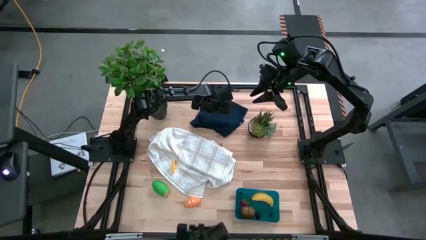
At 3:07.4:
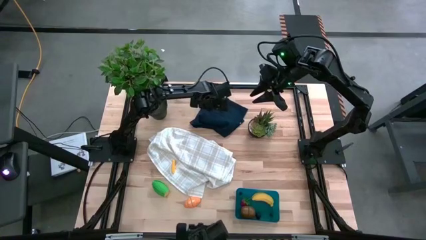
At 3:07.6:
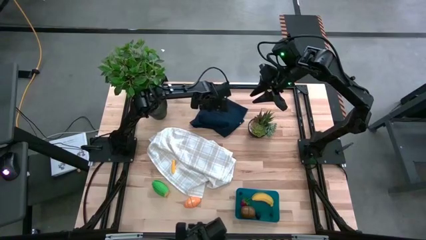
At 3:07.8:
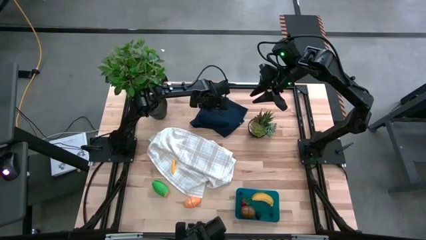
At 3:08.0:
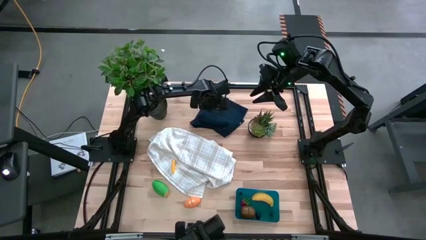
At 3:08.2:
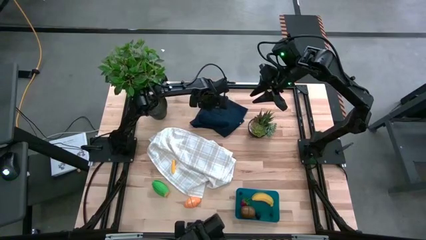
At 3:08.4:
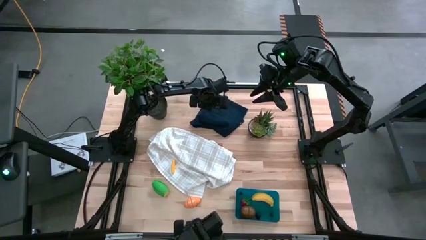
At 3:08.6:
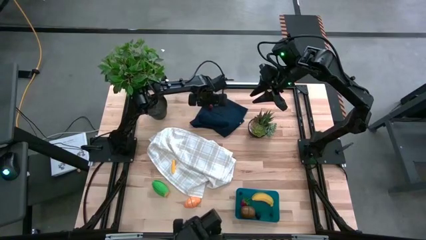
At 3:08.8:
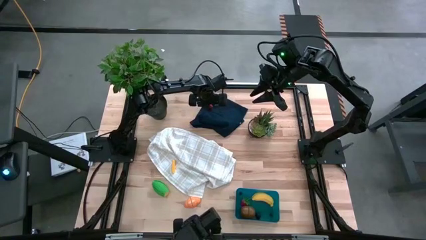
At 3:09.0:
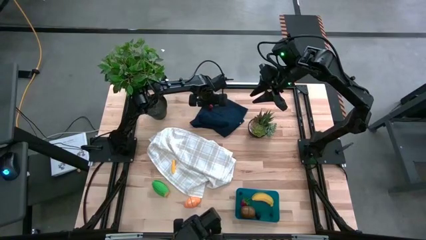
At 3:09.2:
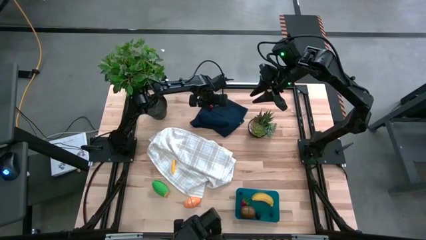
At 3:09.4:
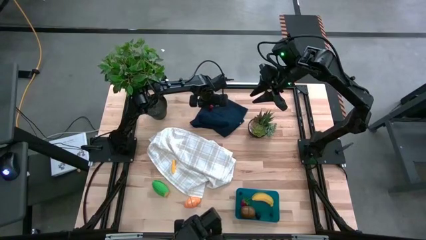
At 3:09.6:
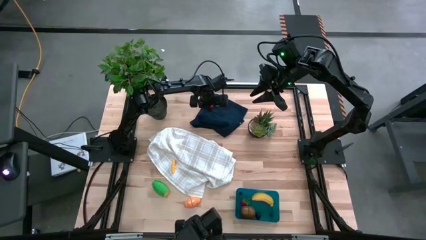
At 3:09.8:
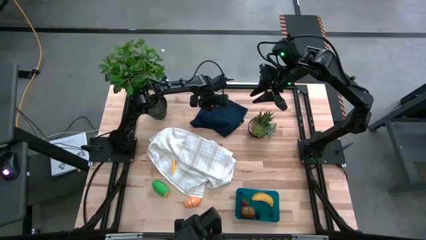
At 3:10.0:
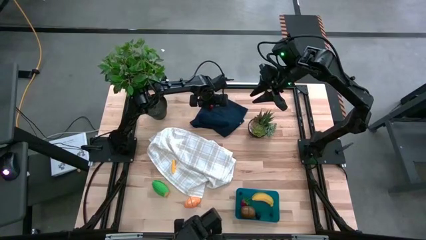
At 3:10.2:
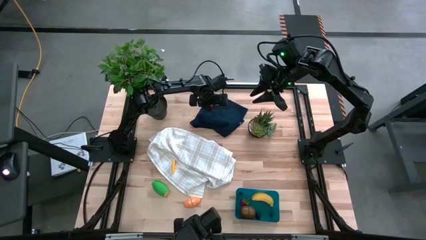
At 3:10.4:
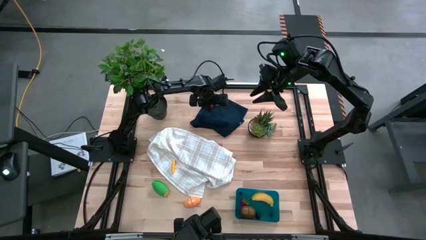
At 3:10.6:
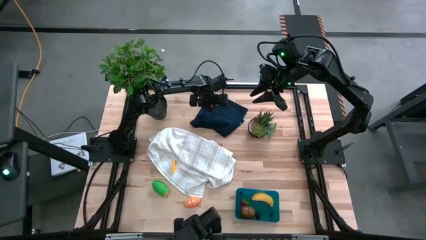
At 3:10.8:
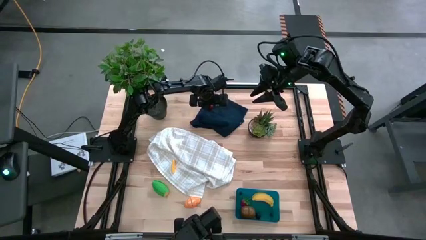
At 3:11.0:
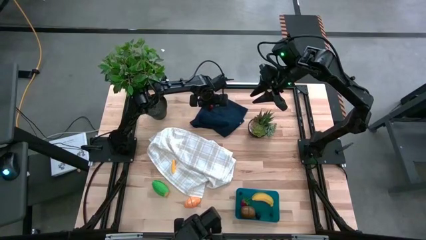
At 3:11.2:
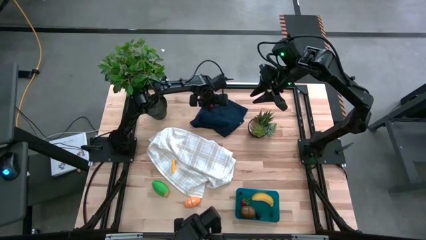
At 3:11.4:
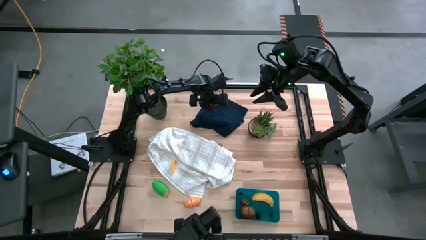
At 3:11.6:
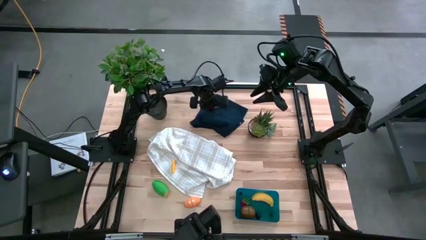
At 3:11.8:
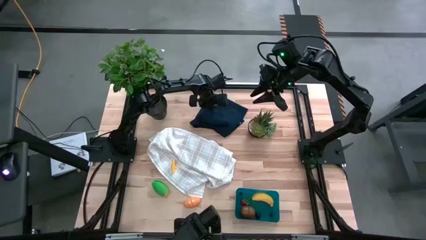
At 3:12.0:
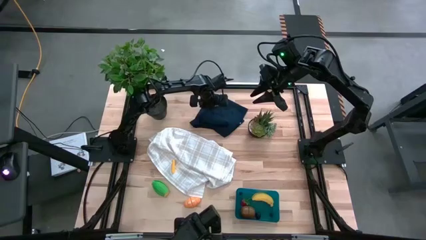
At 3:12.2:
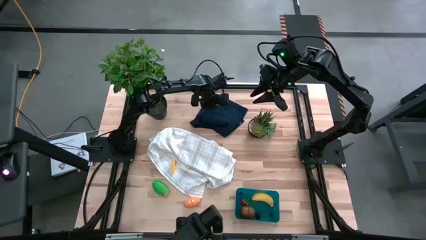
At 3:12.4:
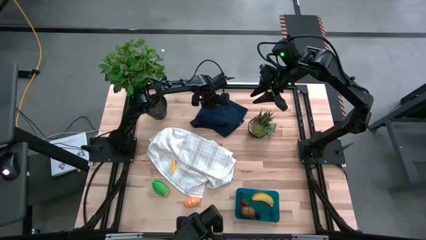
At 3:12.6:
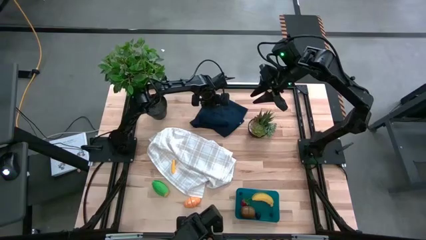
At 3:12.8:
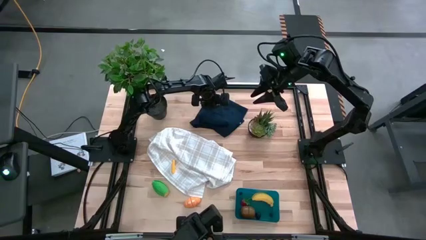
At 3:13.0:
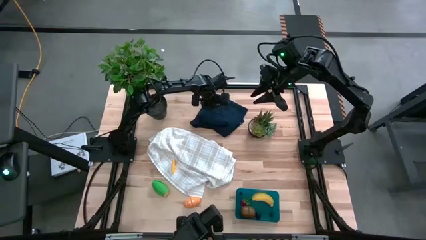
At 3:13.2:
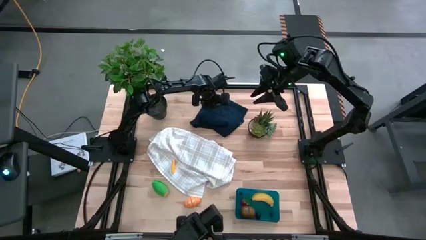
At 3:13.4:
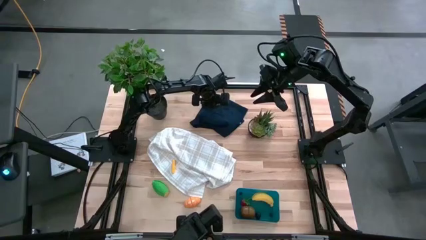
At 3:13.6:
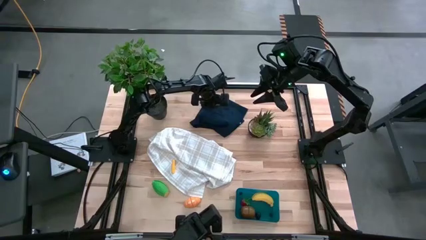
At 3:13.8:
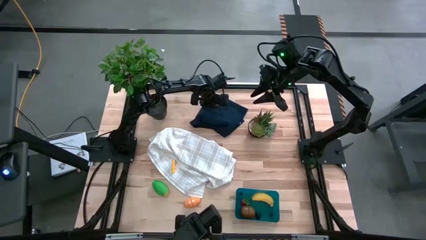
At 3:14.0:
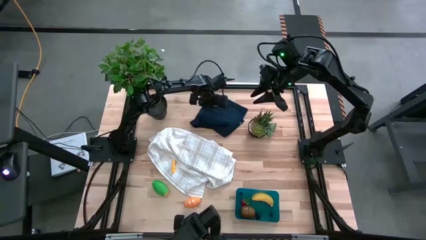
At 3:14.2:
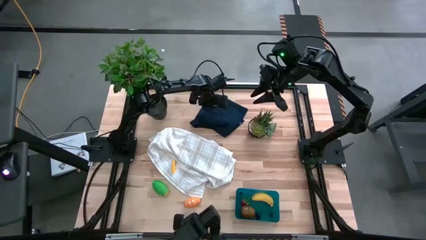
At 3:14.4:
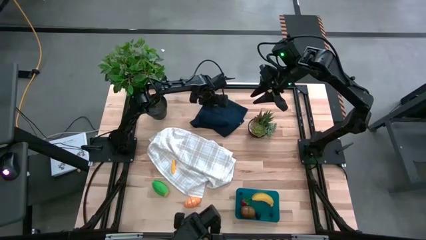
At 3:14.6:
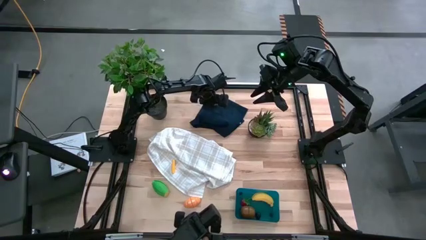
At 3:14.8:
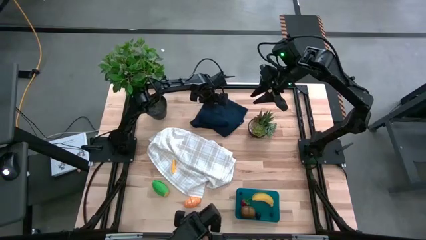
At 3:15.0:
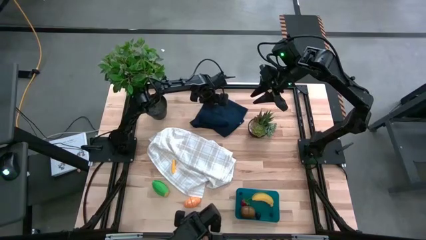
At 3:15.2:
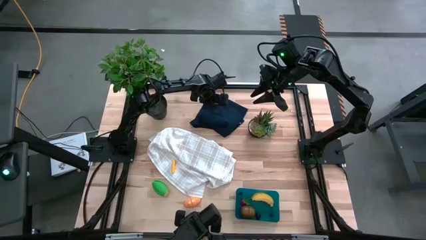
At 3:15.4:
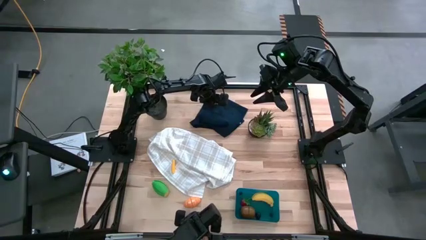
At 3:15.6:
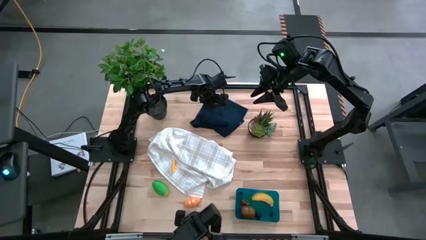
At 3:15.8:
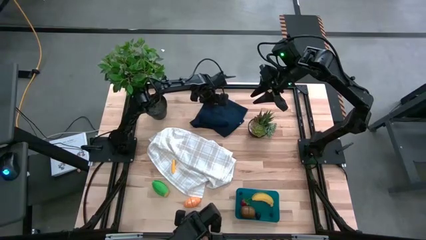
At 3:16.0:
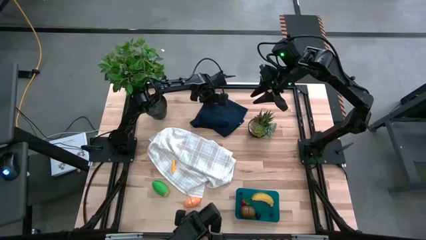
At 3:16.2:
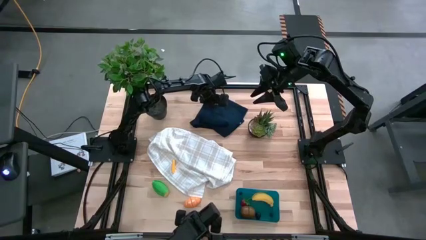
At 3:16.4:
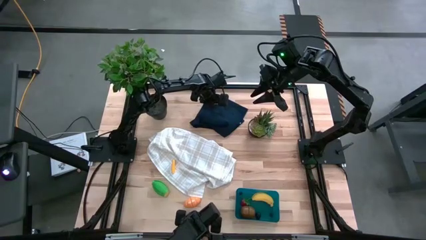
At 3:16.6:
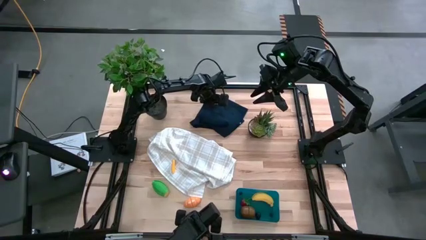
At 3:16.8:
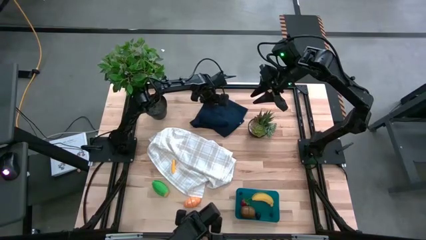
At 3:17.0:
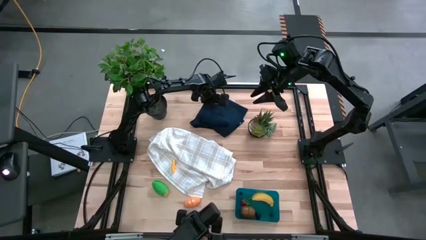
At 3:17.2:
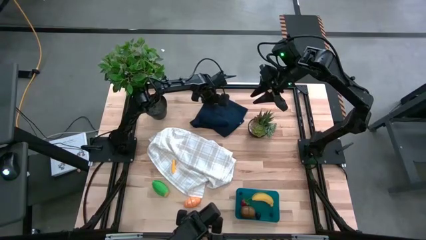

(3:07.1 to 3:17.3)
Task: Pick and placing Produce into tupperware
Put the cherry into the bin

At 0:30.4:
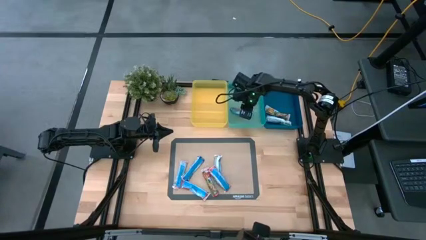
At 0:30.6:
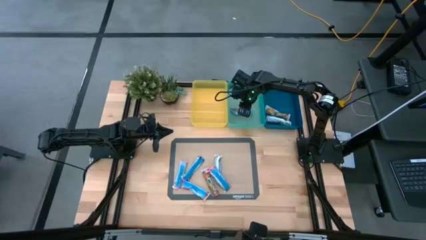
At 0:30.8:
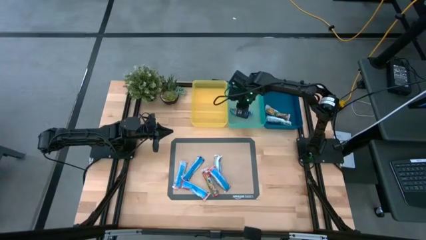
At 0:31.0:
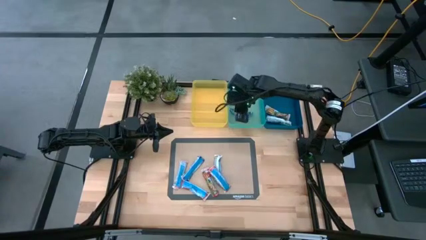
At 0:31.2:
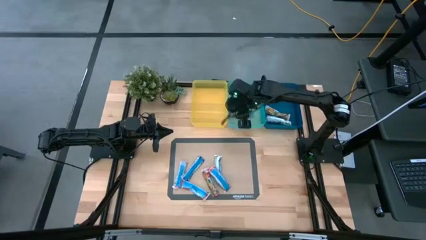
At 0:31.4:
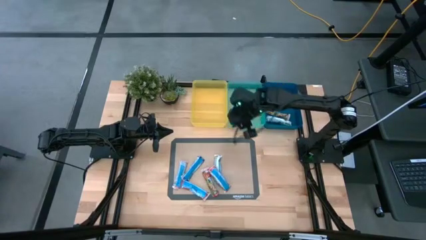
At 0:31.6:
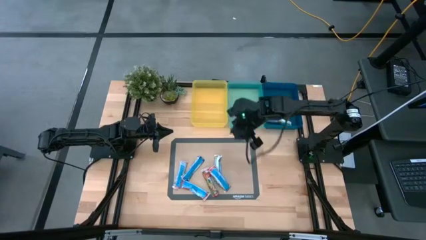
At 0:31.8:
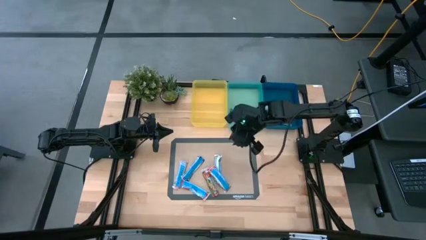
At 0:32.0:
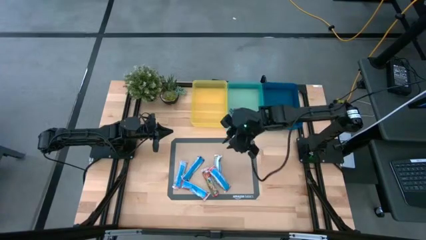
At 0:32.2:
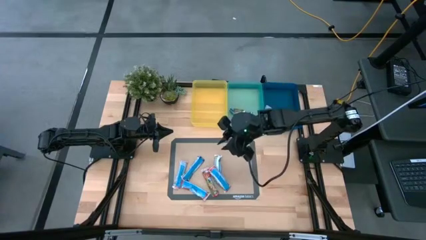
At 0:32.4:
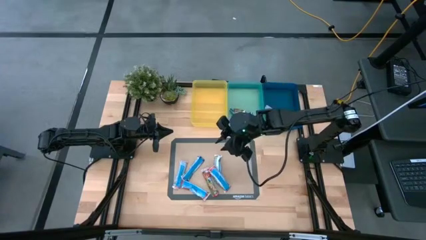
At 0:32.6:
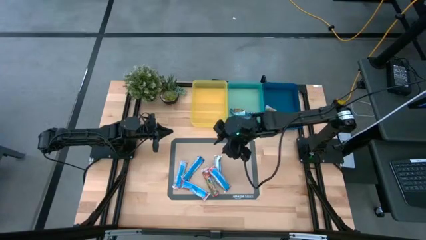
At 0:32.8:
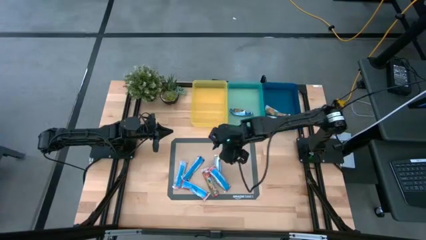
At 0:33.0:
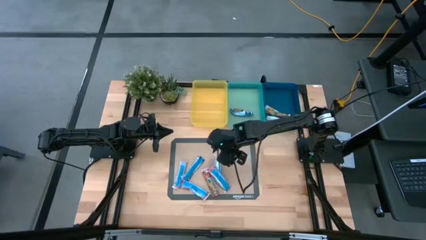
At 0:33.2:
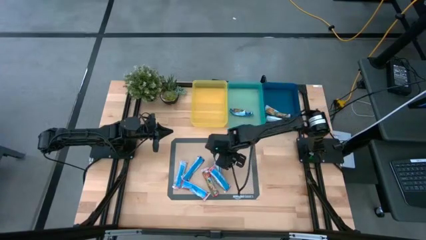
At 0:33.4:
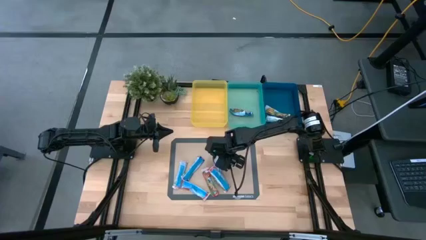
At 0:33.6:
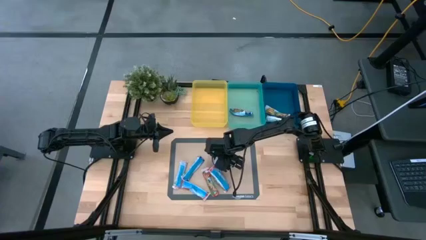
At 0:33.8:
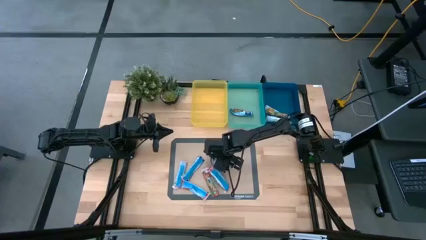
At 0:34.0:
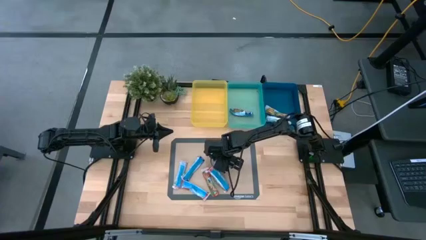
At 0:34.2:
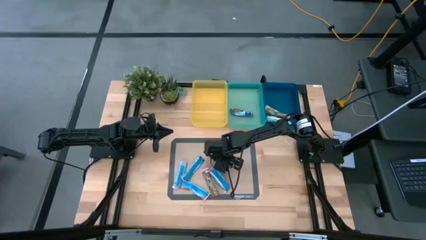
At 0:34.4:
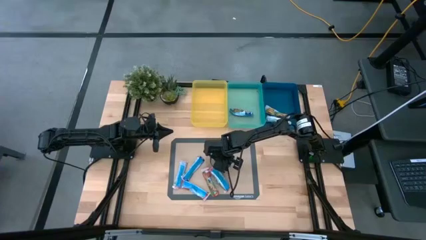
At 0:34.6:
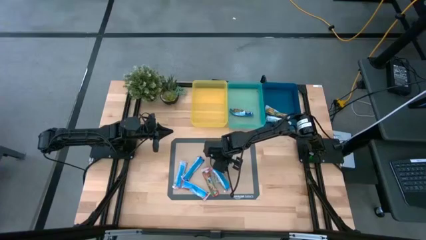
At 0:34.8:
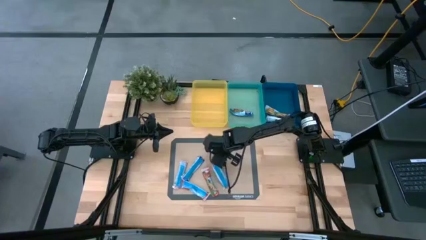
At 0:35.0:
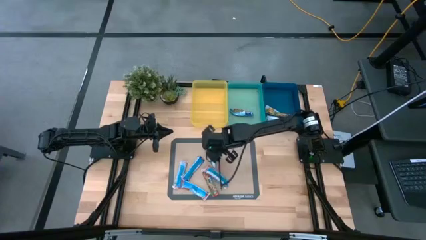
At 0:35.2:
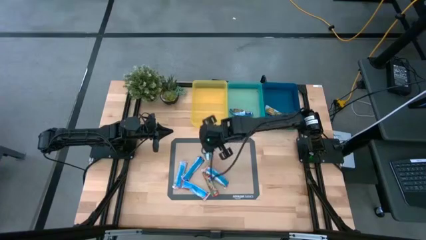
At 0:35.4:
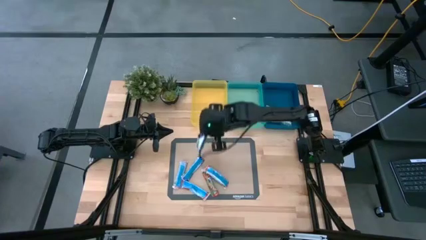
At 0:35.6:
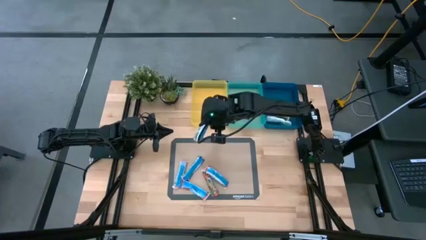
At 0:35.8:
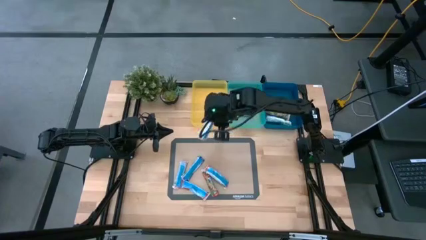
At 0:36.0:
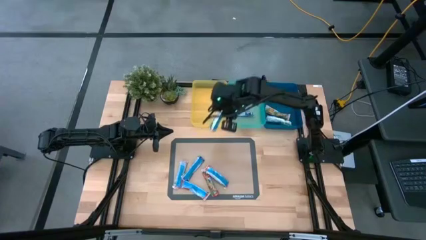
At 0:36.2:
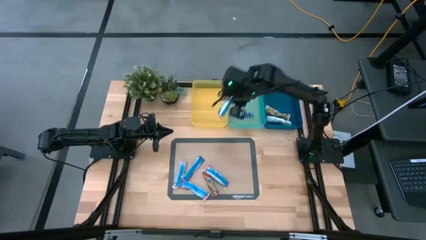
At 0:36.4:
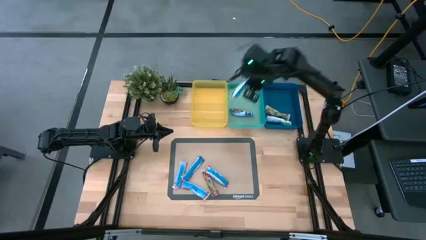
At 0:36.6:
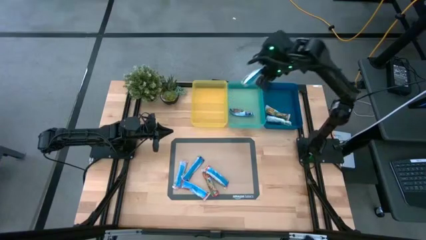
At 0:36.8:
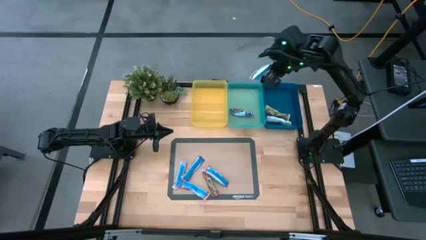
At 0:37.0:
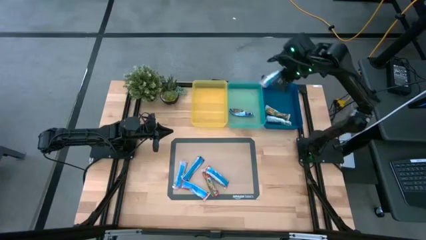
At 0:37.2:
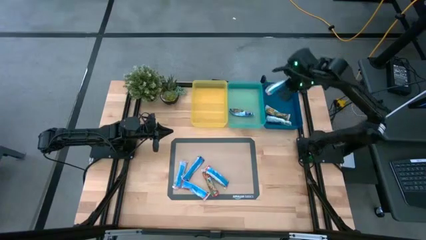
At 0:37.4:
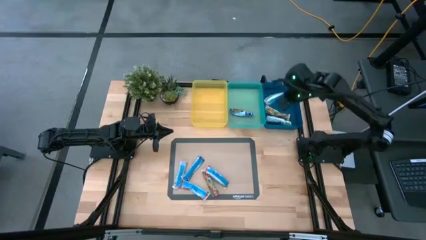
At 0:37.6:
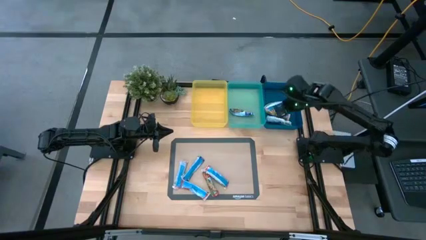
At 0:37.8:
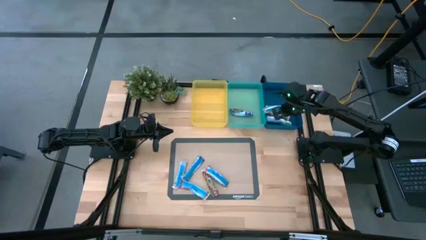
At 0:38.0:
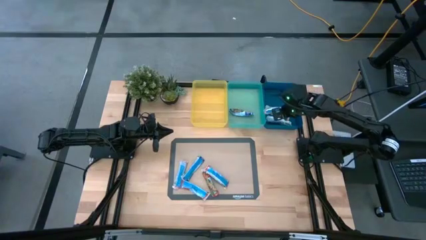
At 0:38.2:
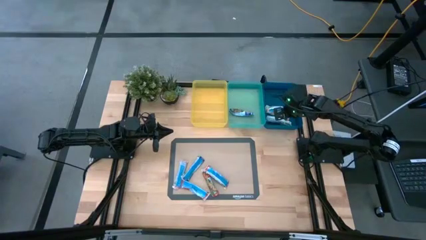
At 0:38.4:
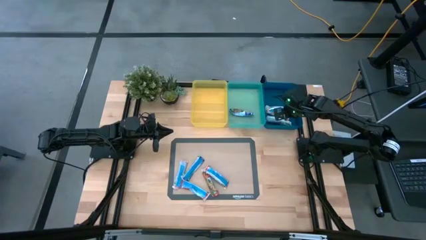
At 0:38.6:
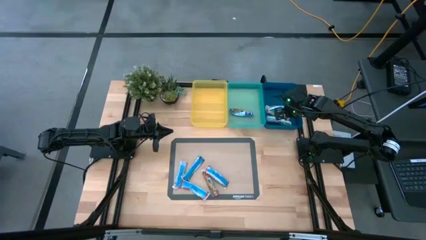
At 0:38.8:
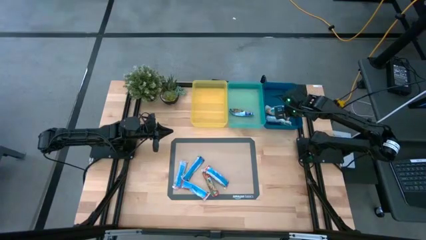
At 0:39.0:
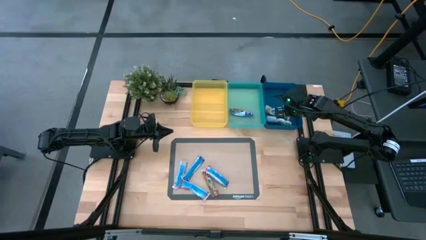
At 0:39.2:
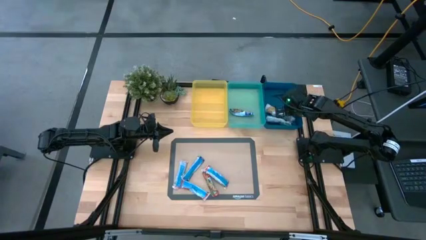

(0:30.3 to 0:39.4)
Task: Pick and place Granola Bars by type
Put the granola bar into the dark blue bin
